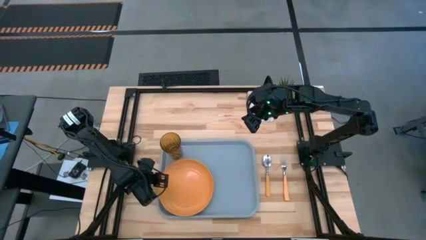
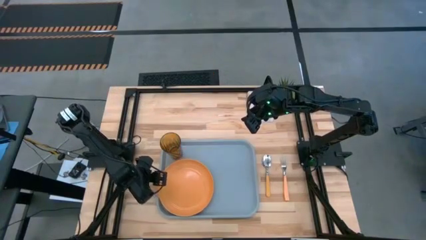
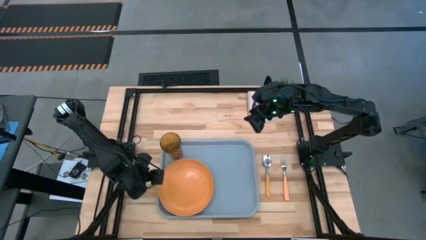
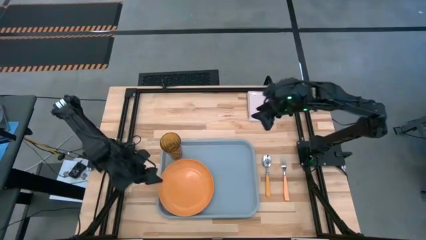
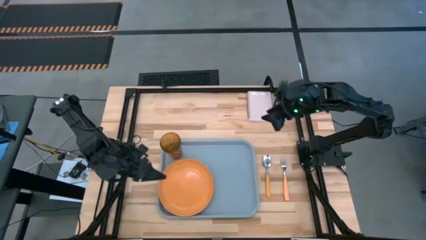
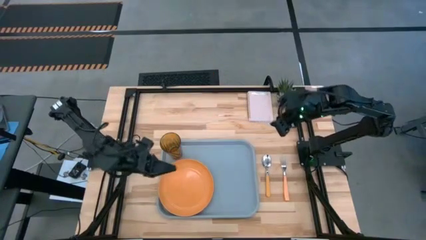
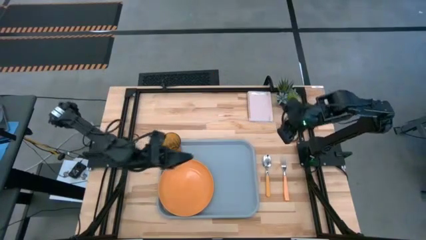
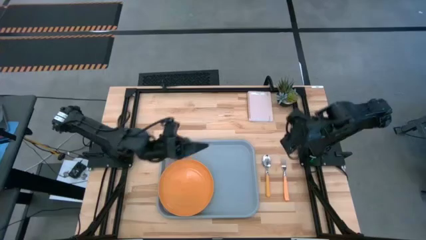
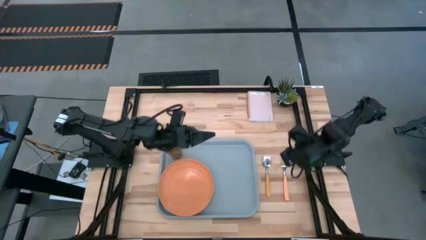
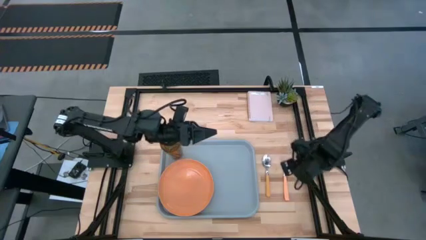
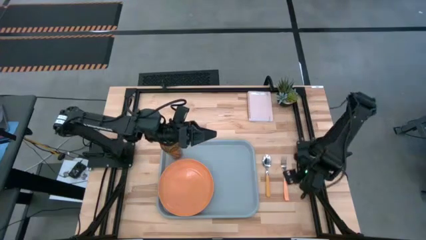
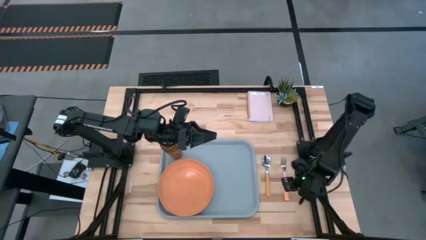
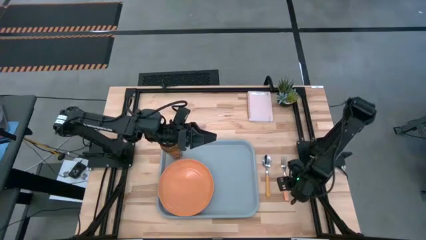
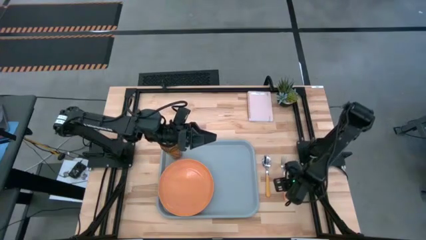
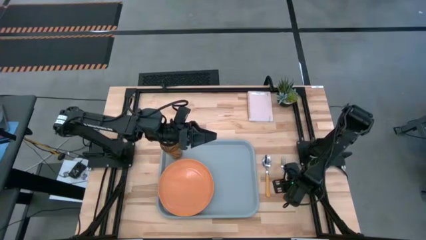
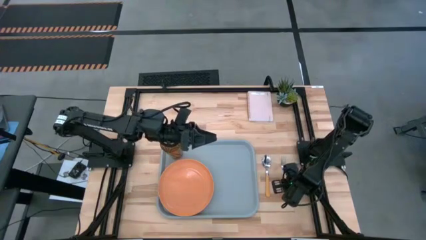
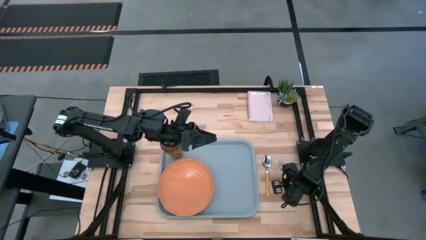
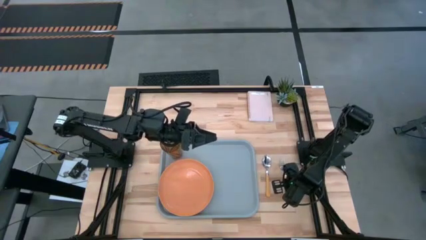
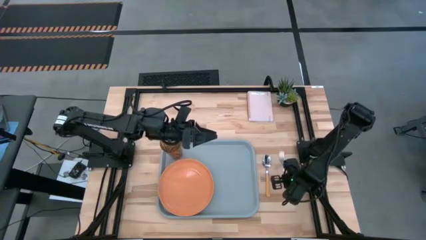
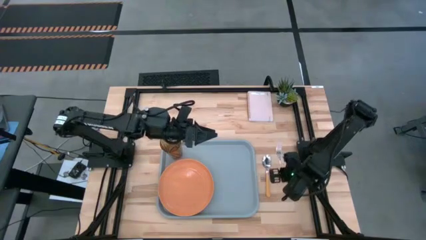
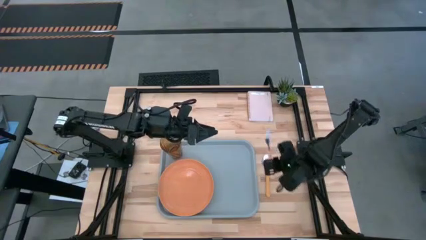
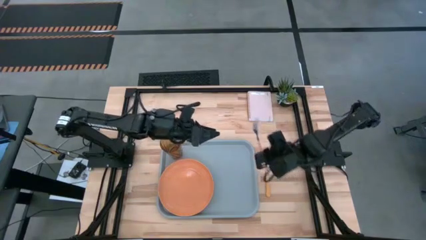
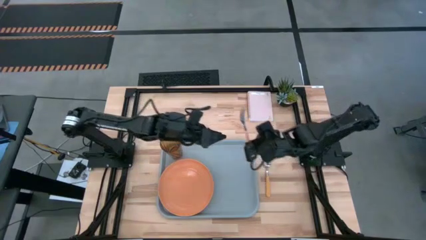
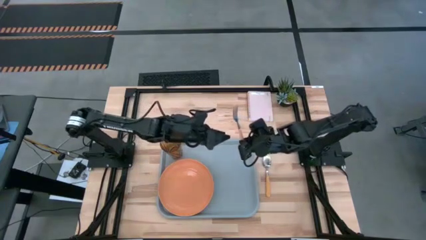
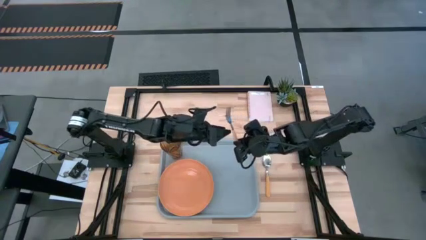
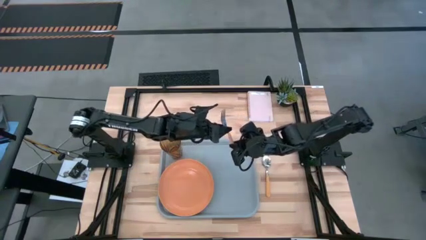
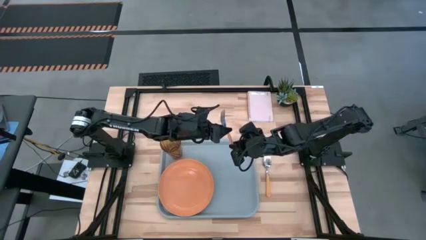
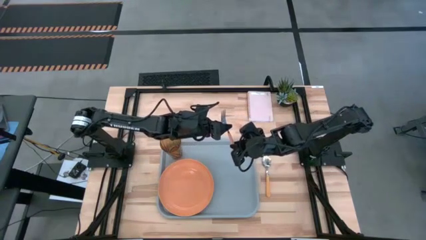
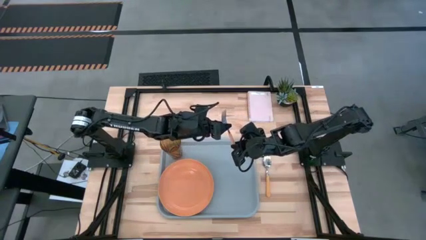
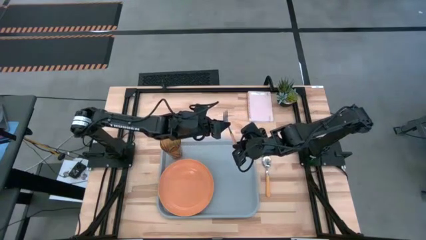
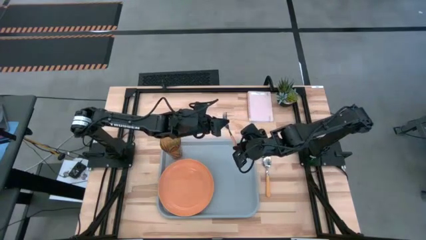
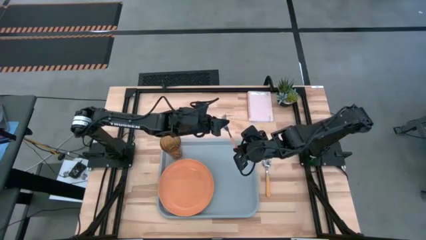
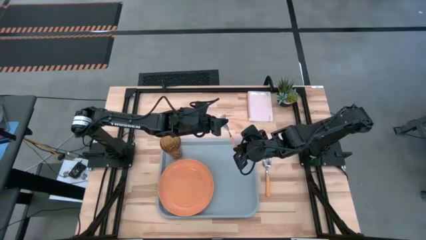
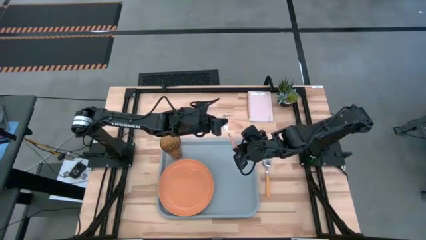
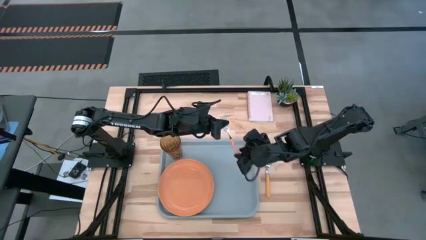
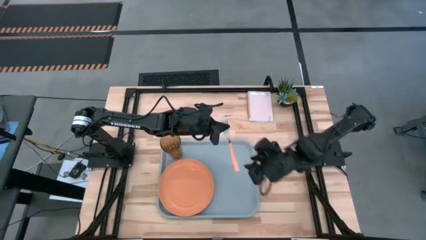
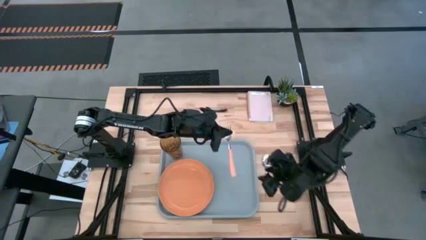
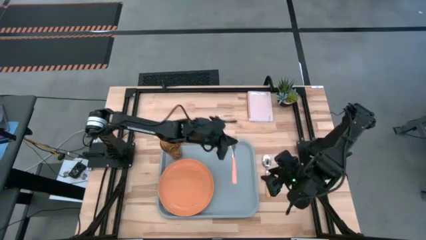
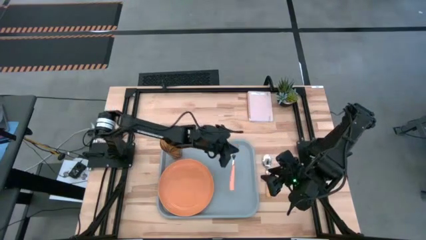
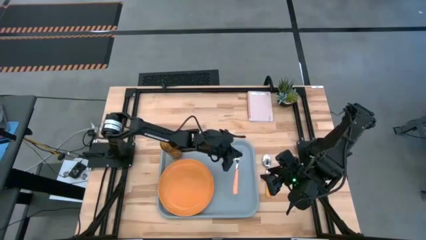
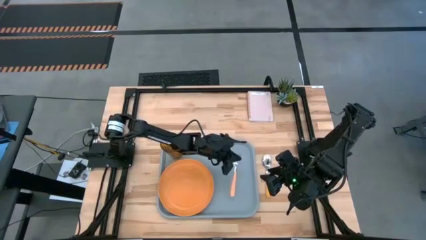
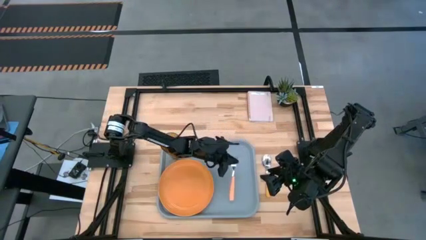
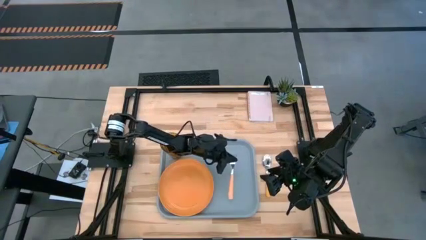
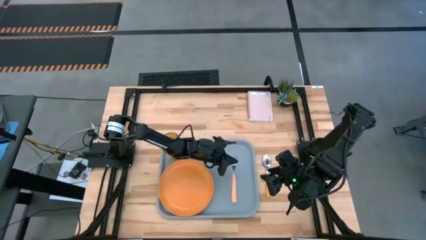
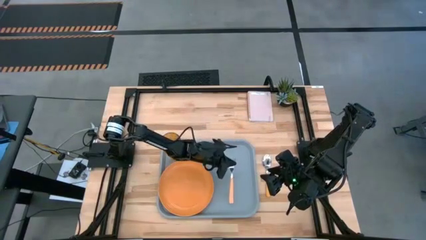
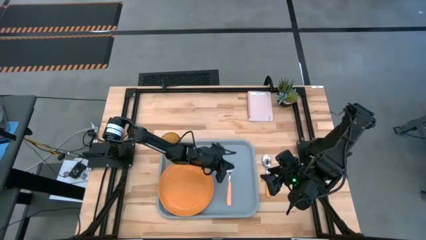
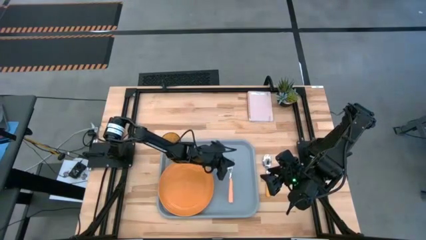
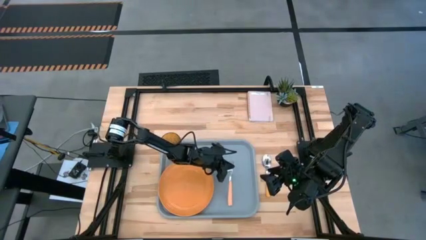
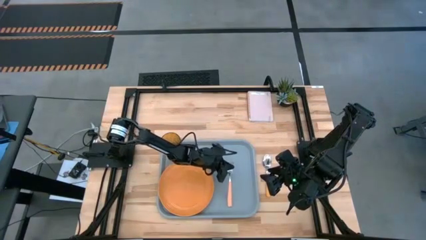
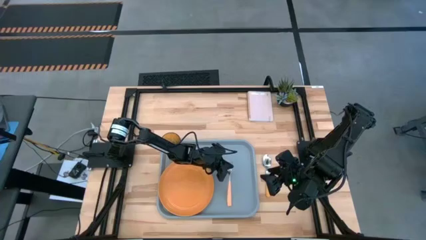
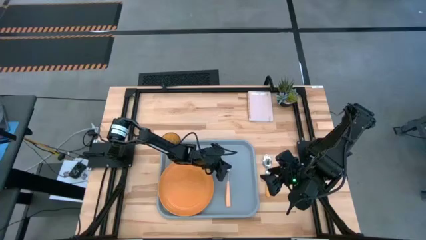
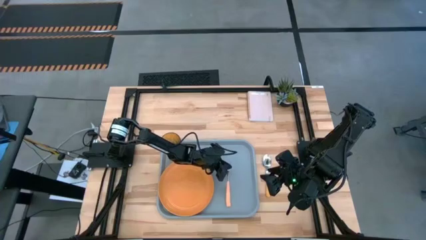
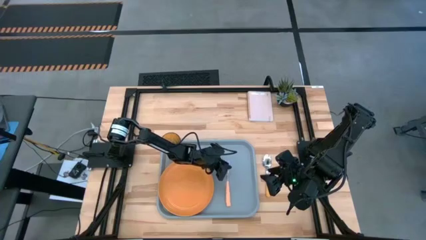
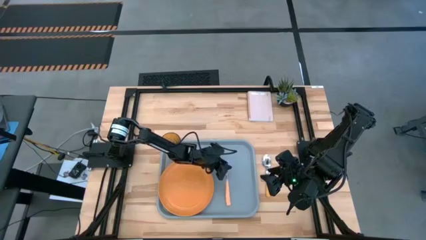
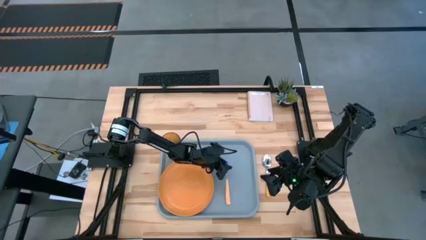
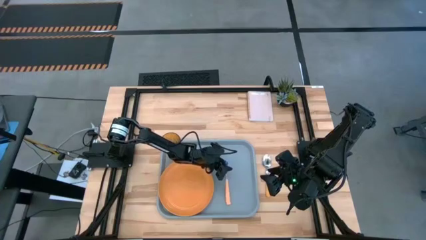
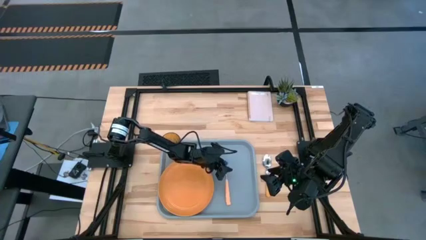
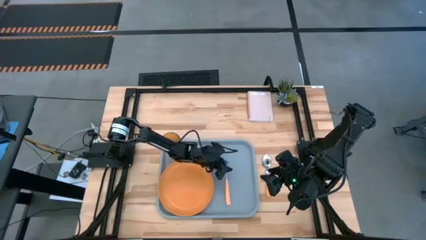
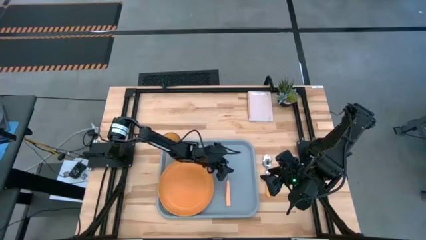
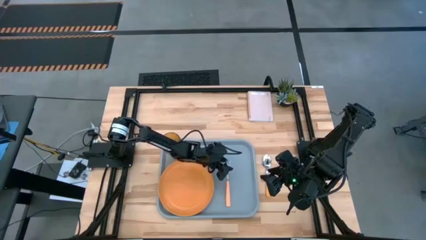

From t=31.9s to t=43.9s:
Task: Pick and place plate/cup/fork/spoon on tray
Put the orange fork on the serving tray to the right of the orange plate

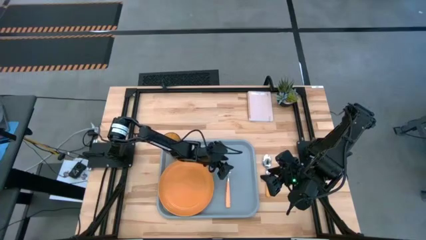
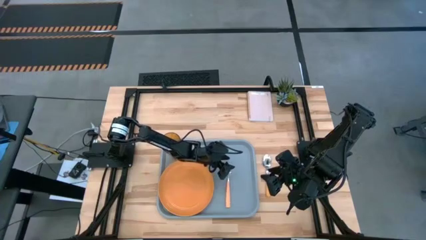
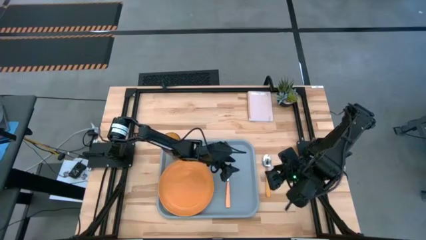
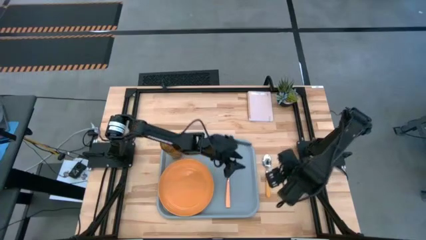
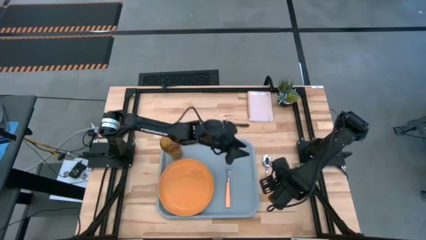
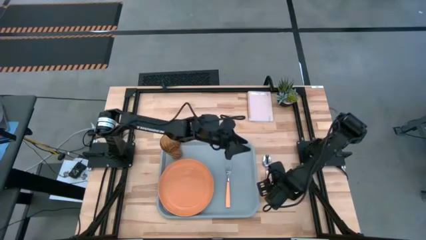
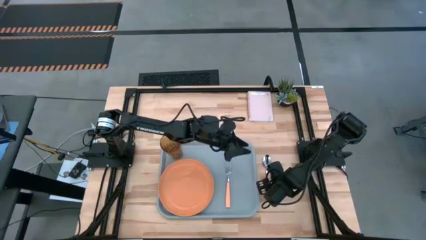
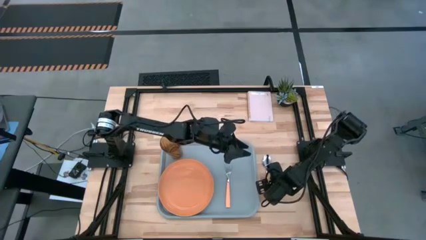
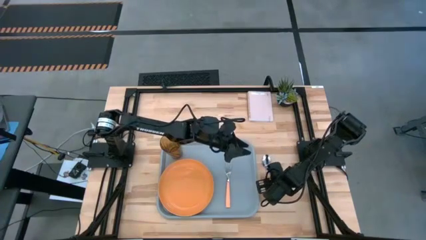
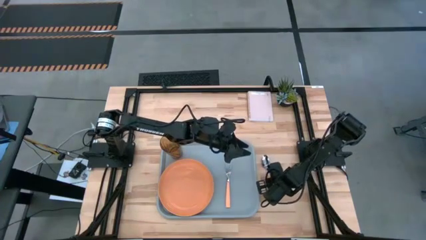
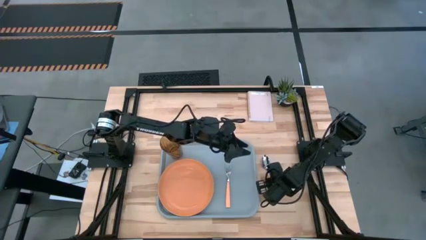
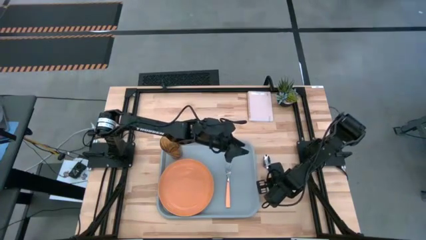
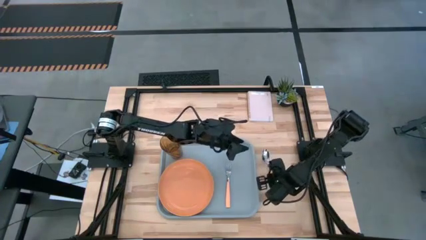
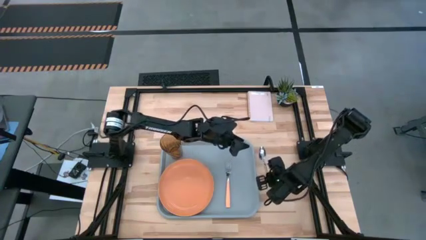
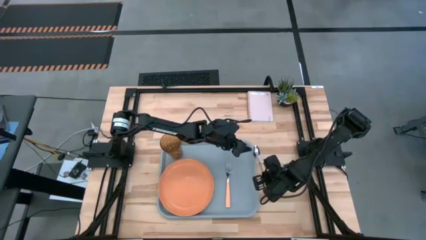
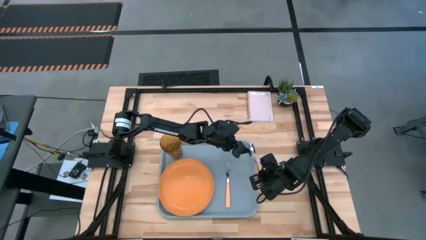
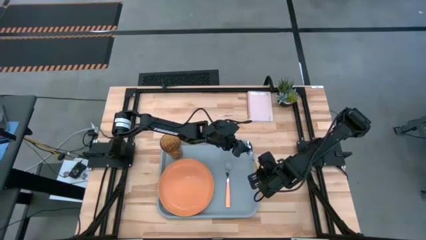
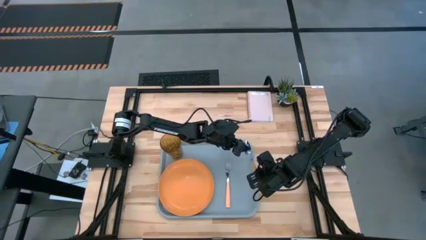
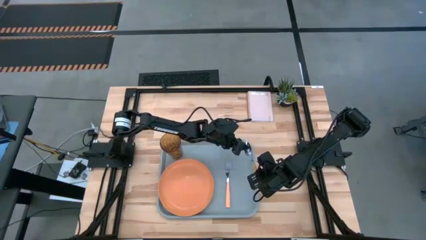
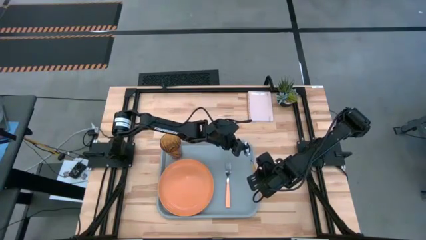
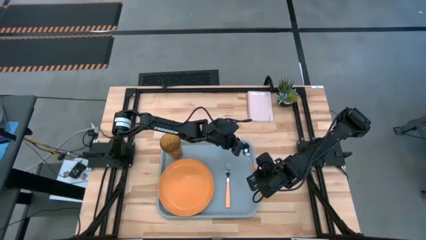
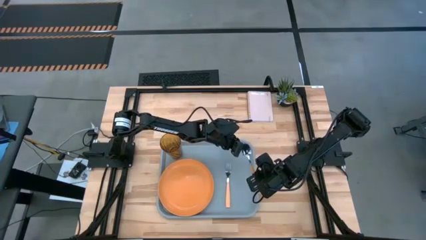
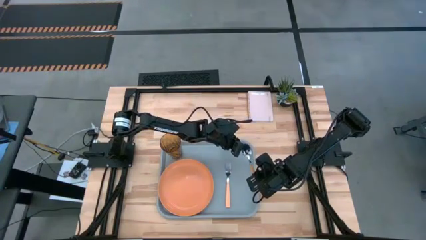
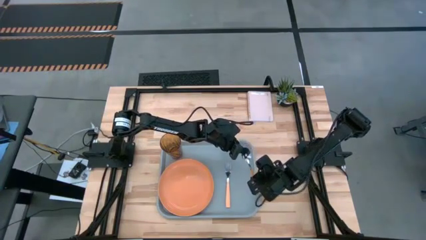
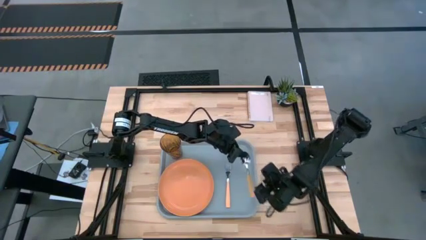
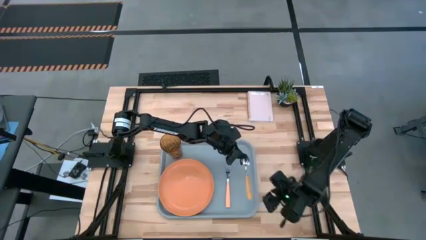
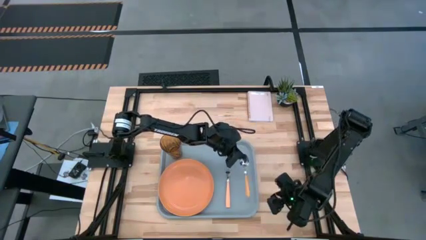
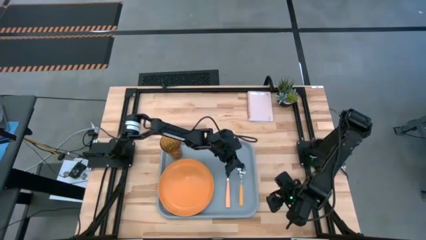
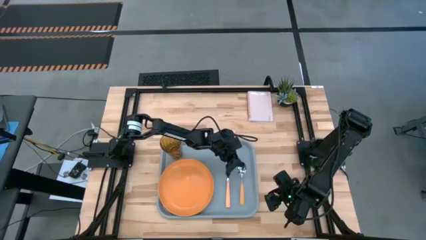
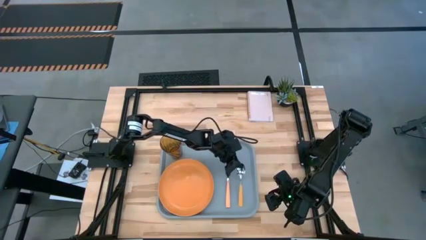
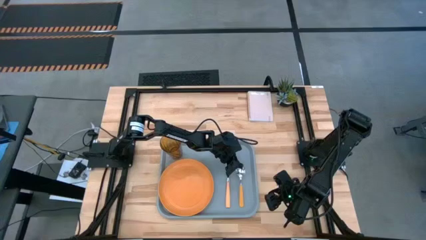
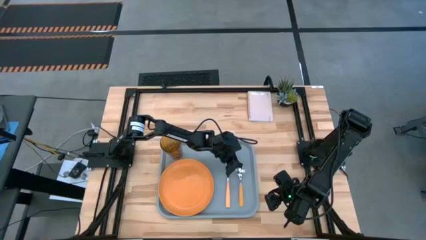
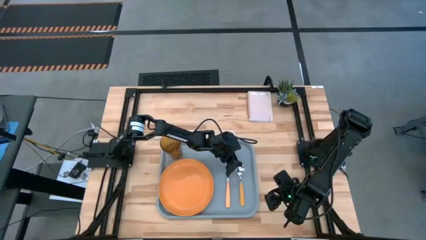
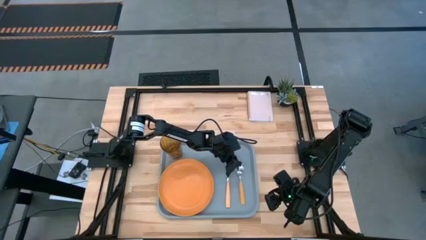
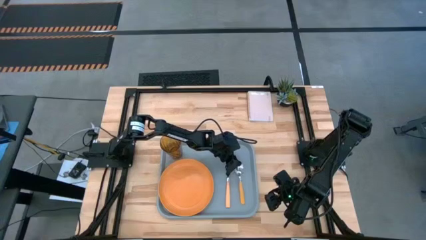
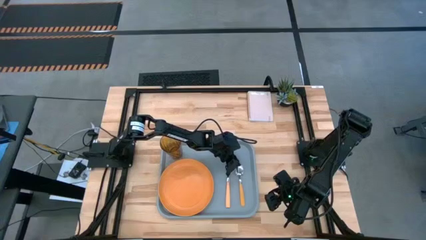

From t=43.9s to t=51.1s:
Put the orange spoon on the serving tray to the right of the orange fork
